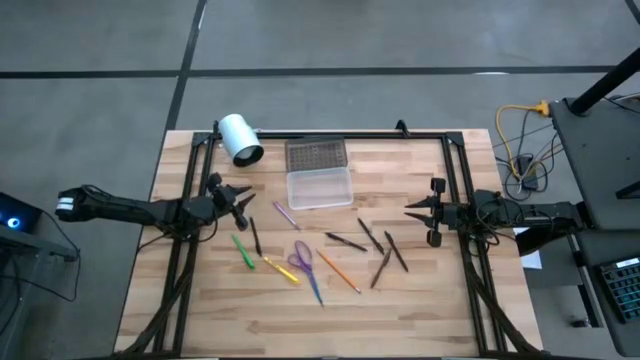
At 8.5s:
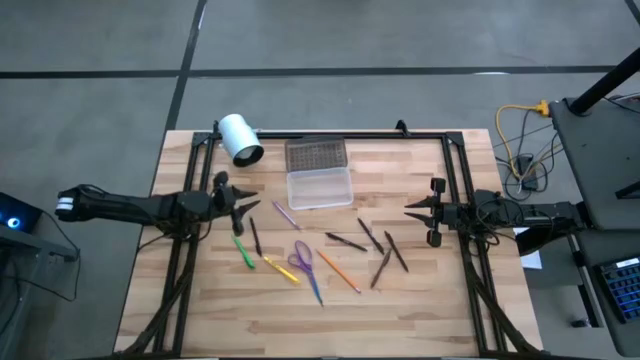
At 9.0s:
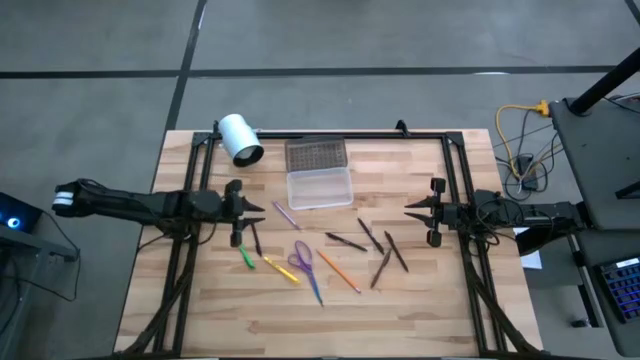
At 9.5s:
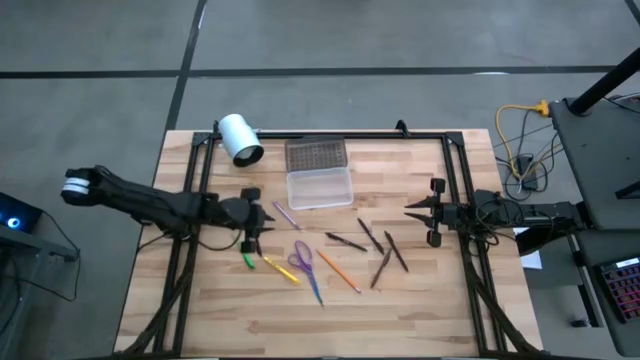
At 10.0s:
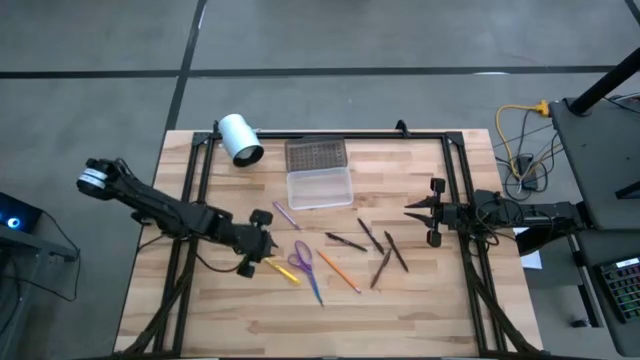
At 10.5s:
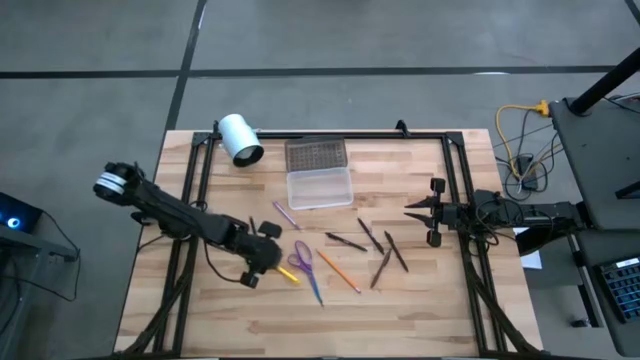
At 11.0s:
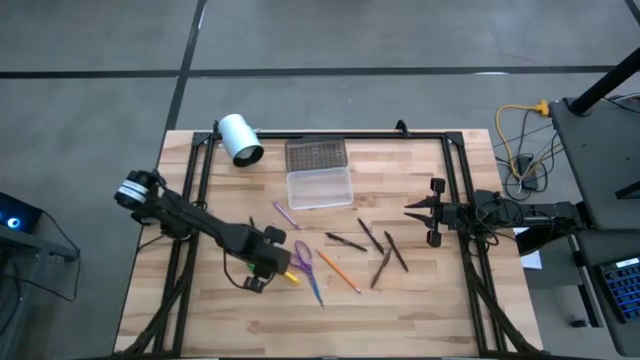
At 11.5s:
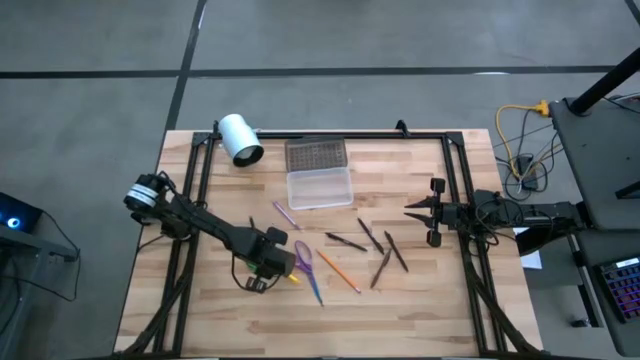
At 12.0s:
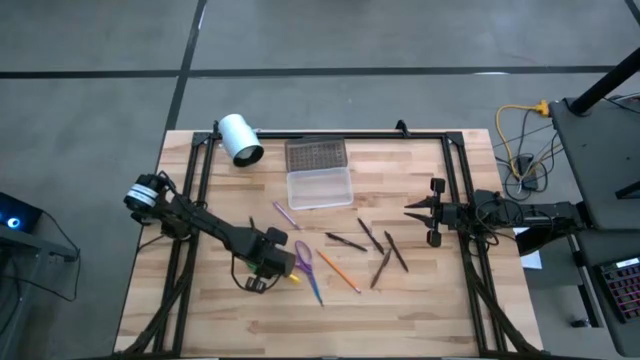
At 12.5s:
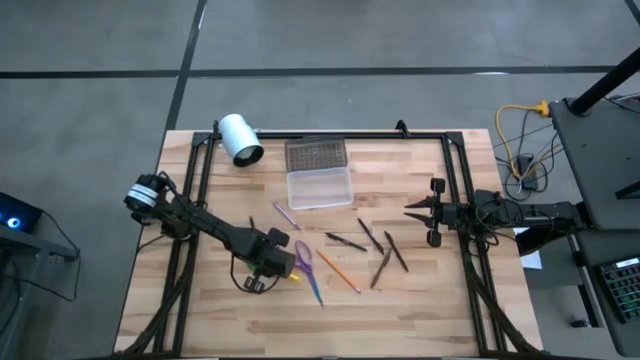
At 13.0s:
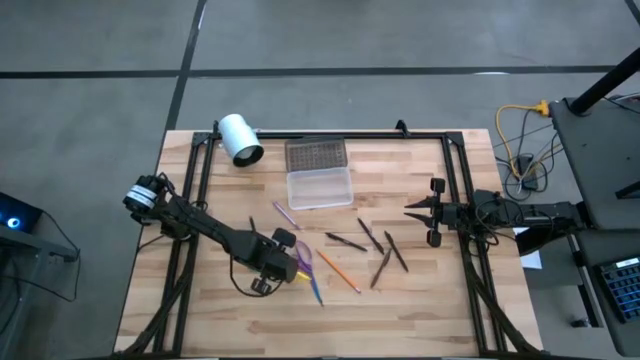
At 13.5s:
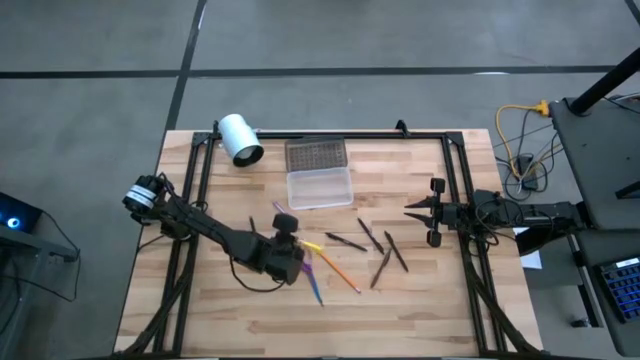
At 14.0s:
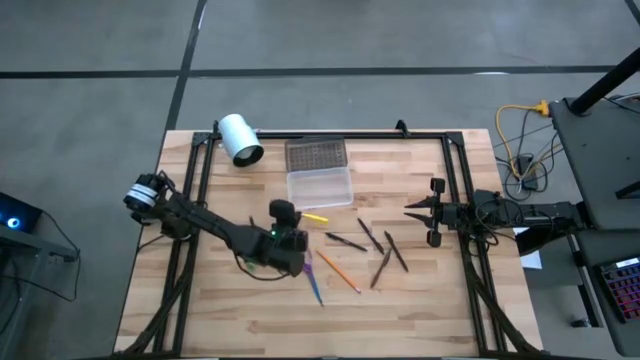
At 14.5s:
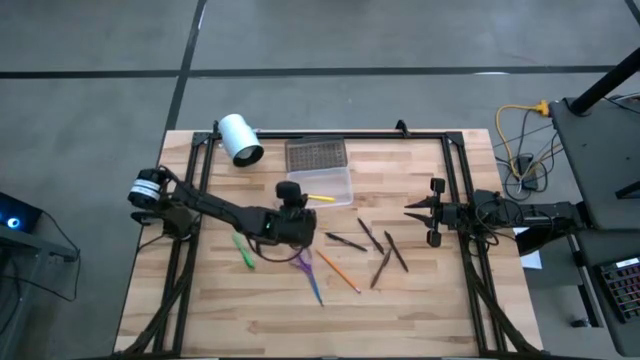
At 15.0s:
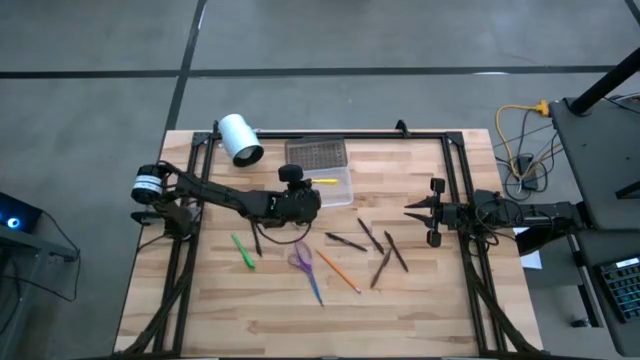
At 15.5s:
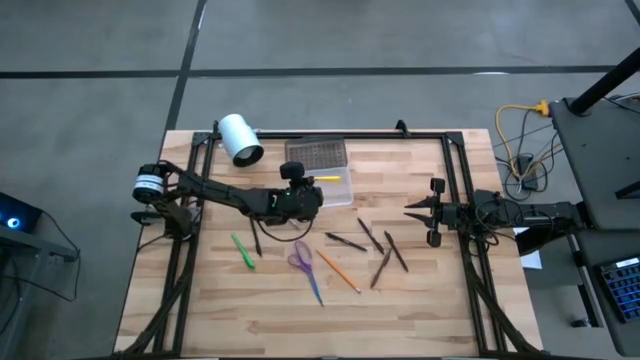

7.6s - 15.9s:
Task: Pick & place school supplies into a supply box
Put the yellow pen into the supply box

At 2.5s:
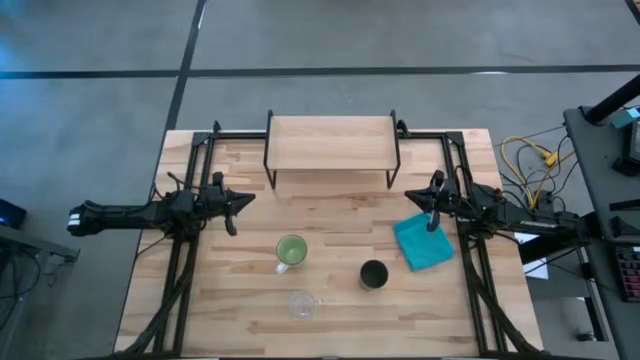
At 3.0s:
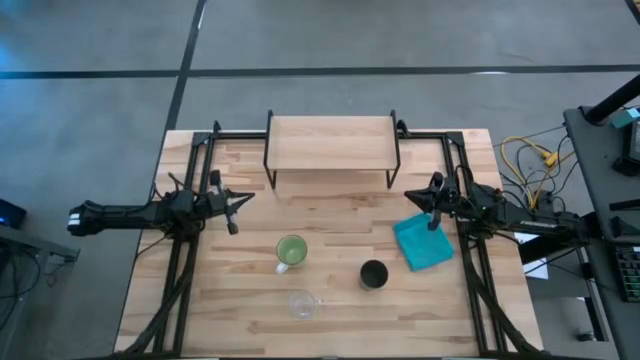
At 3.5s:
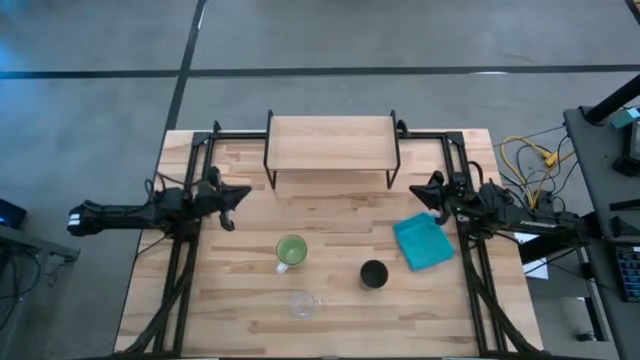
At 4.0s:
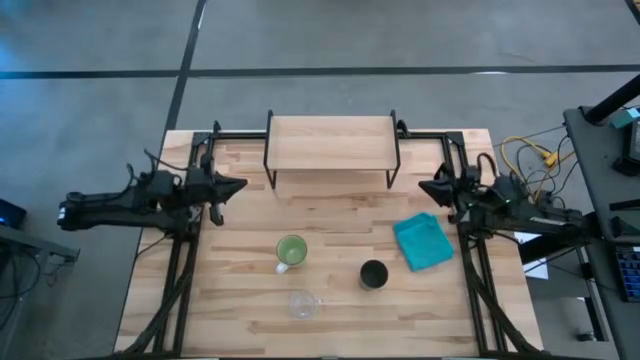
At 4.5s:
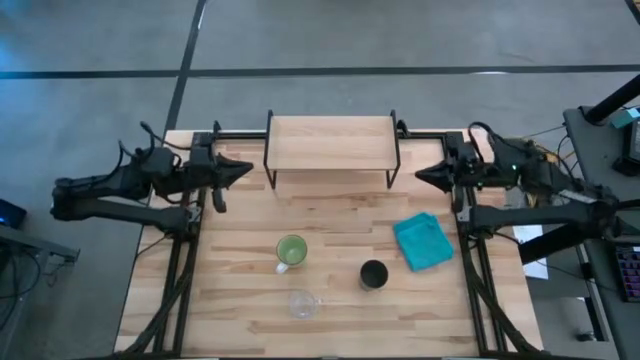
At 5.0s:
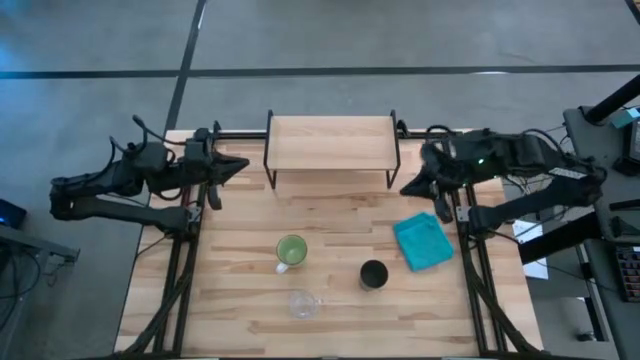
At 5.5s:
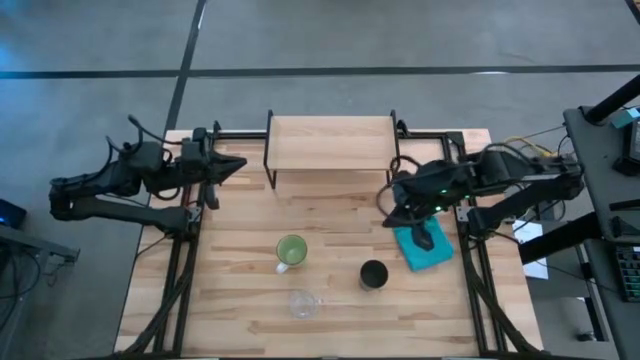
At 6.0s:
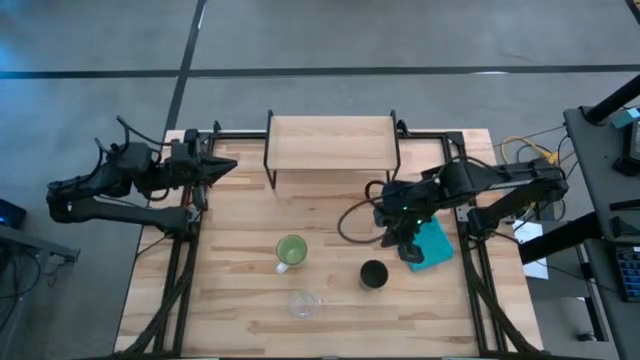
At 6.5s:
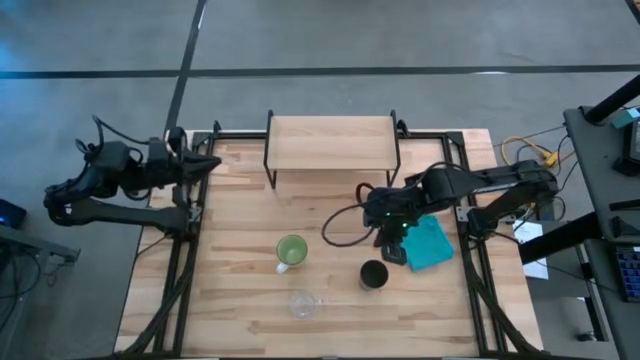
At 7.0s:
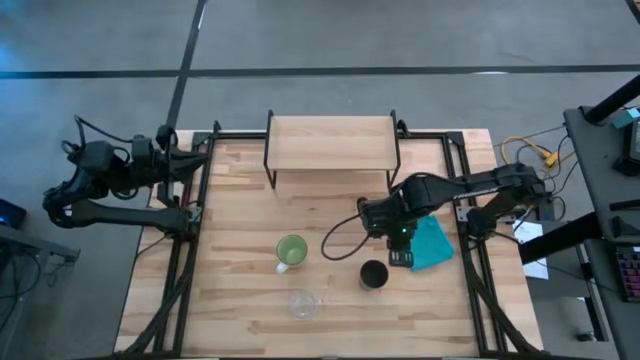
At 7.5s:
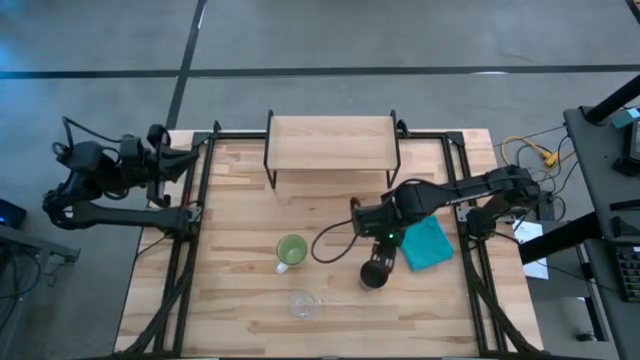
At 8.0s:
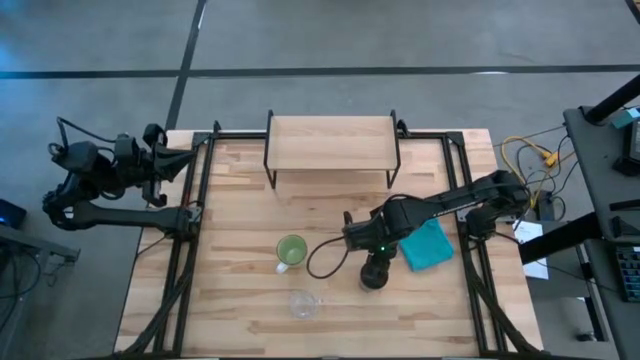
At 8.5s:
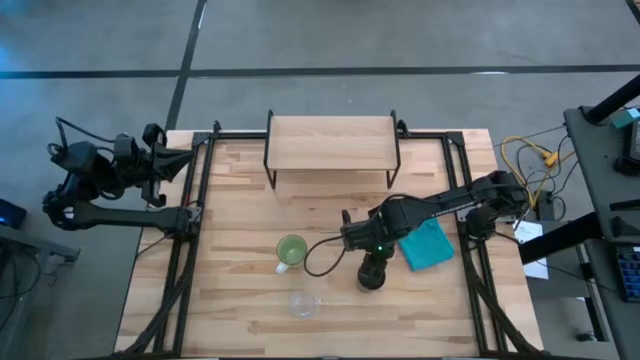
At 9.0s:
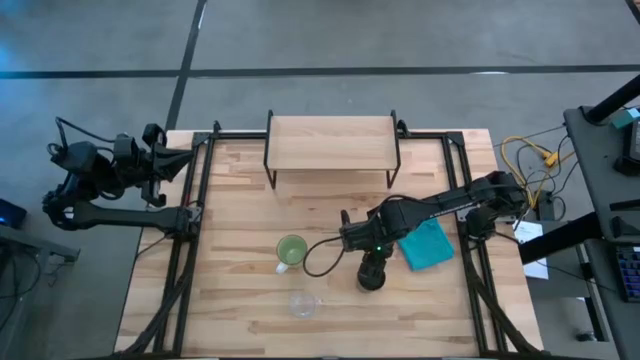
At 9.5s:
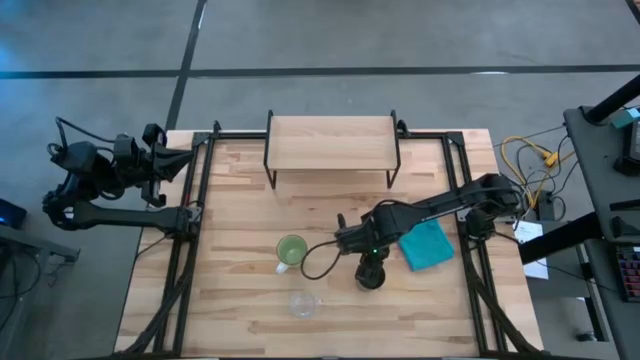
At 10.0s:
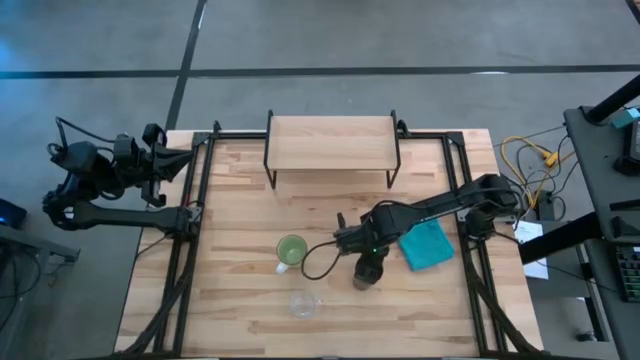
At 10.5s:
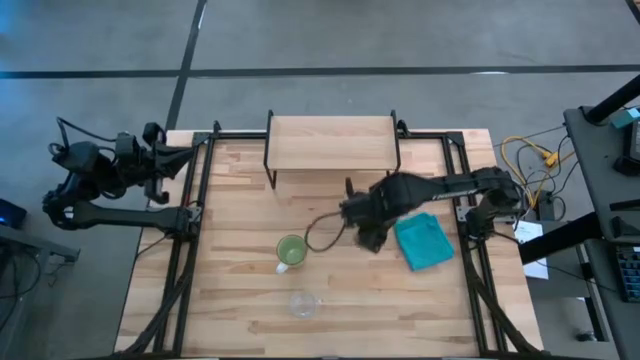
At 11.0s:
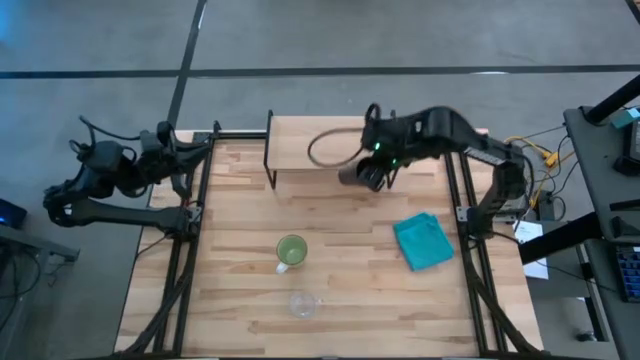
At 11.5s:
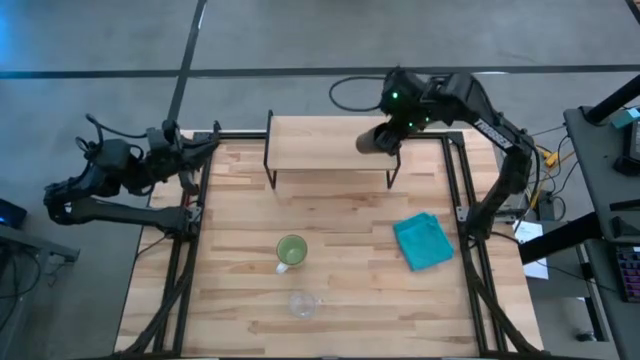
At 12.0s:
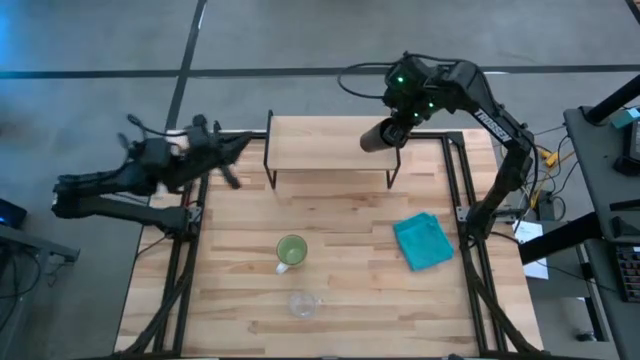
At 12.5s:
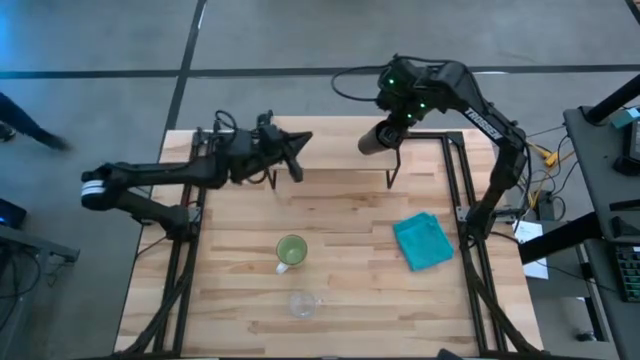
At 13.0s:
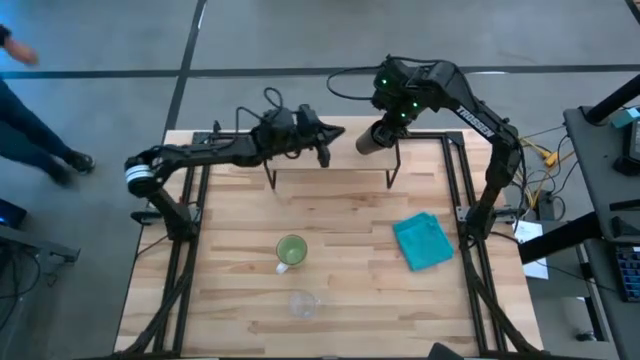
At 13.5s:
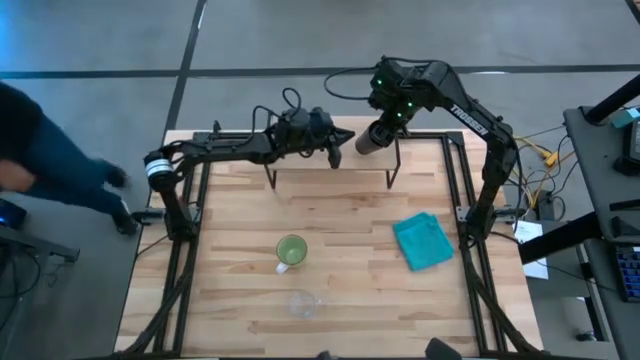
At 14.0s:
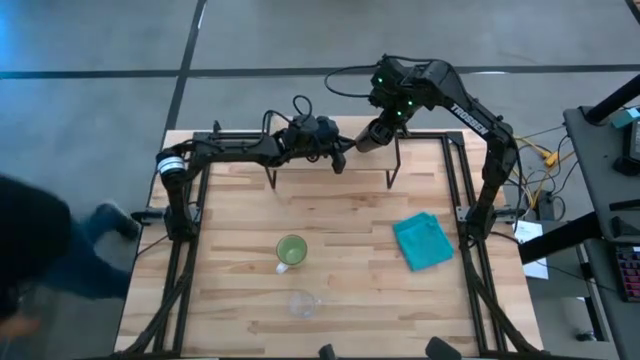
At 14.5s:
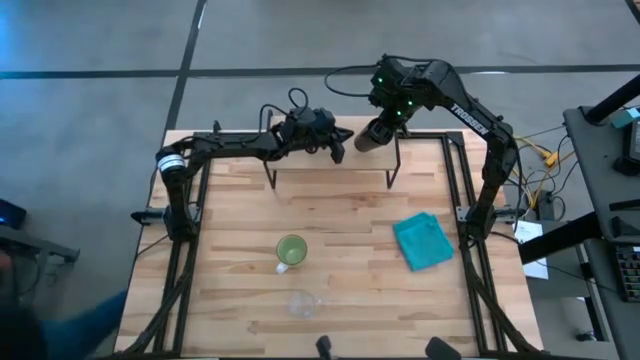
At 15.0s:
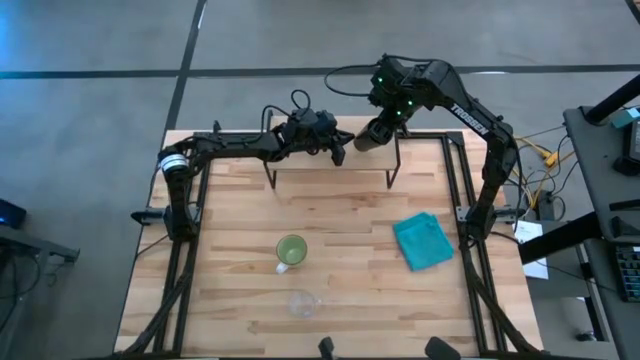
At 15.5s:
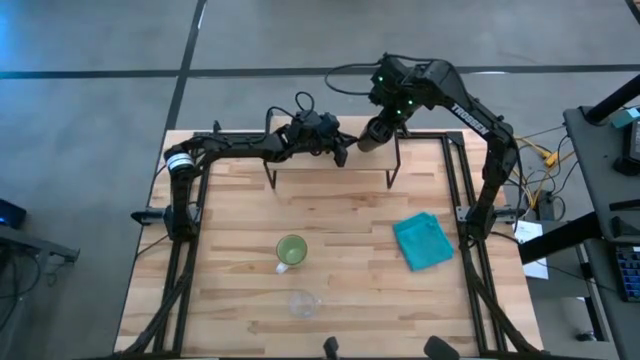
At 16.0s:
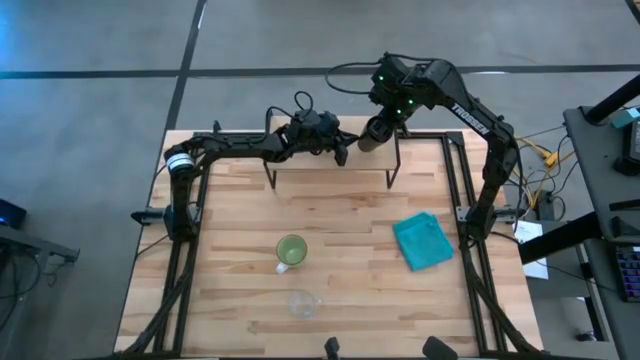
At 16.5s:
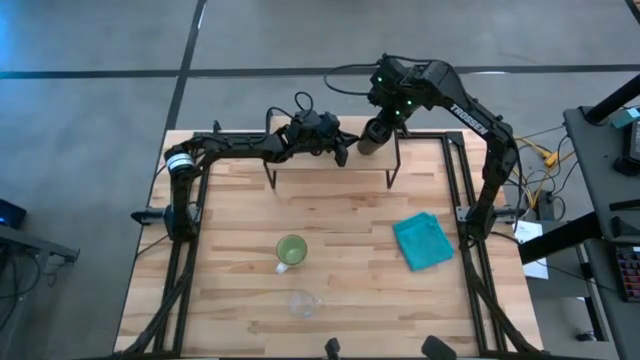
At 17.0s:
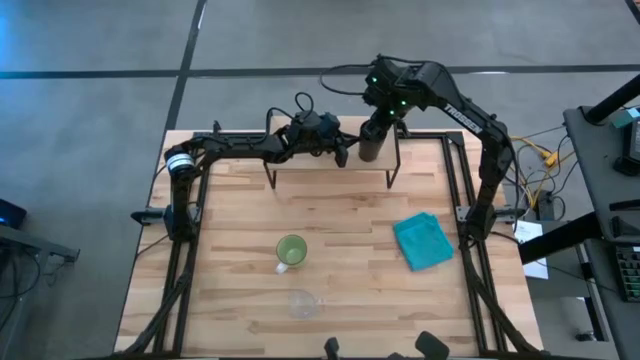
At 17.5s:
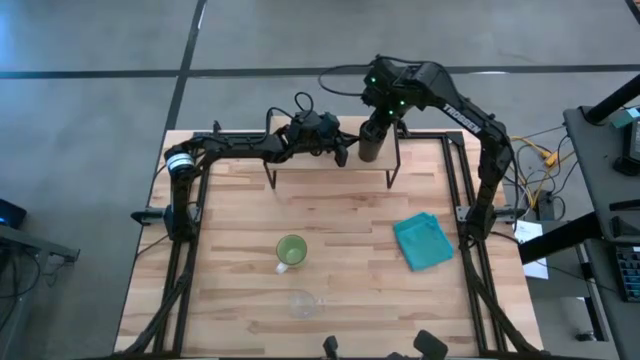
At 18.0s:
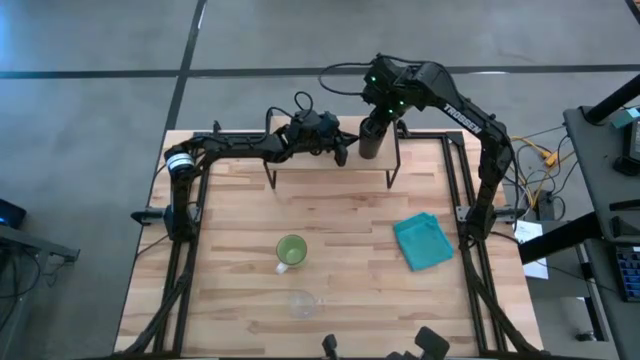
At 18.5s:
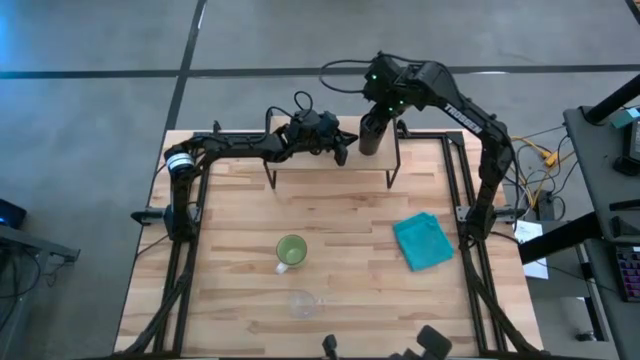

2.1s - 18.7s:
Task: Stack small to large cups/mugs on shelf
Put the black cup on the shelf
